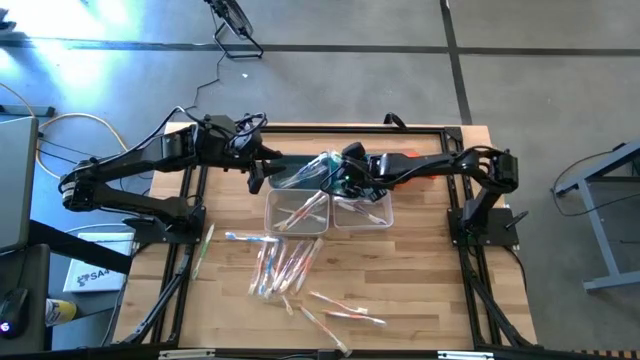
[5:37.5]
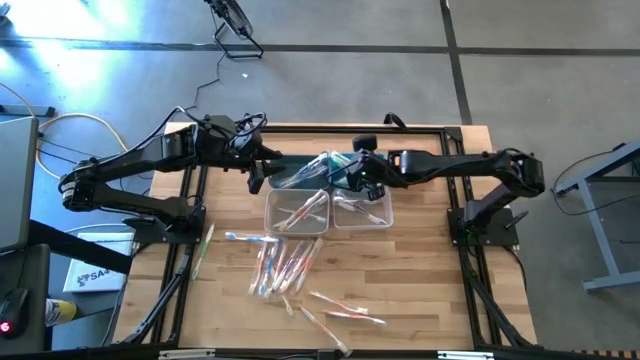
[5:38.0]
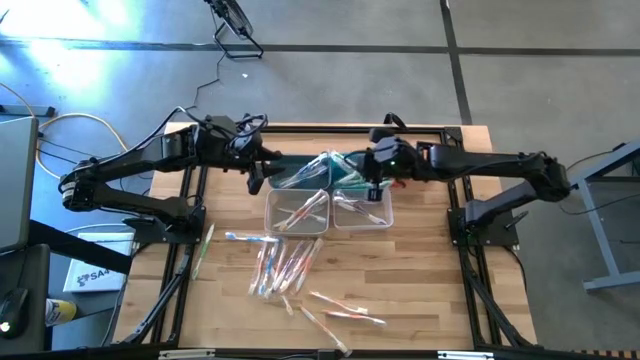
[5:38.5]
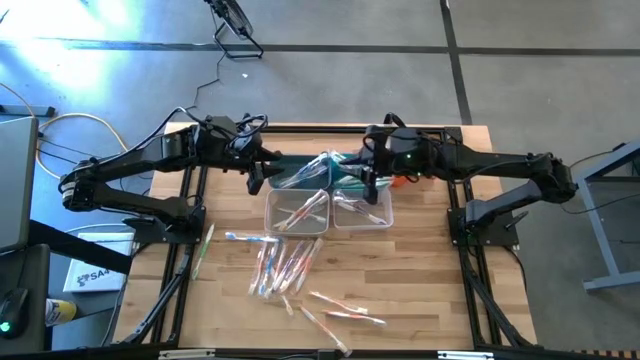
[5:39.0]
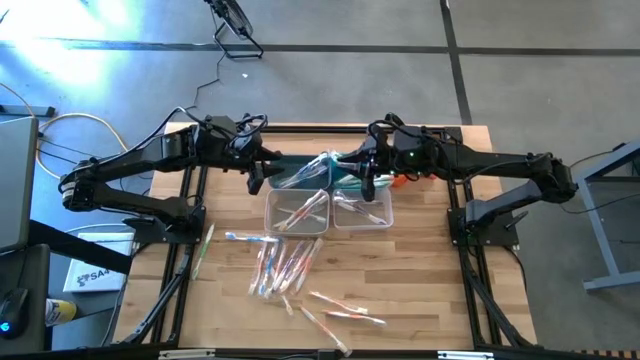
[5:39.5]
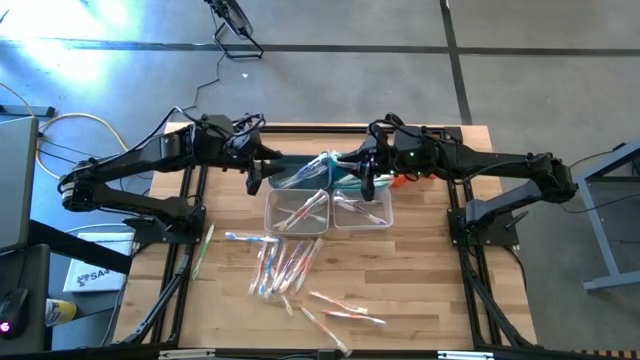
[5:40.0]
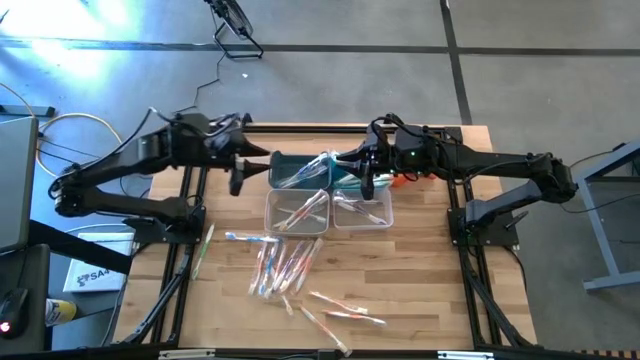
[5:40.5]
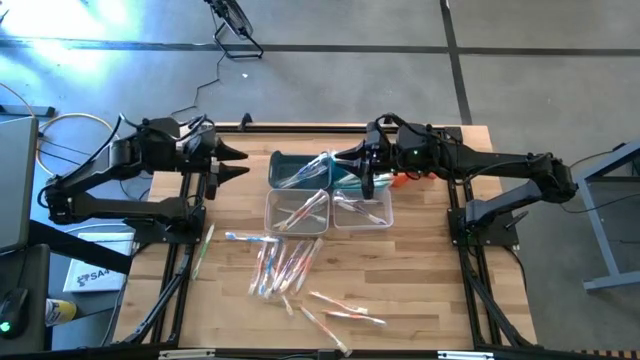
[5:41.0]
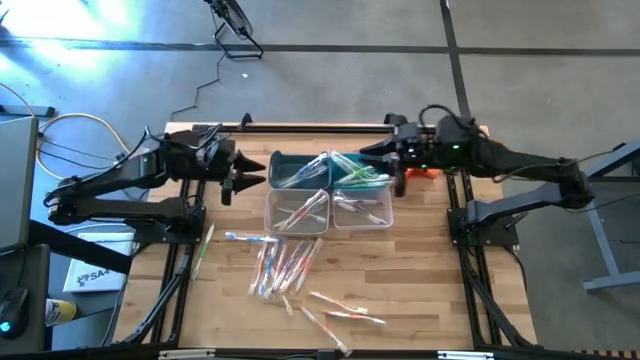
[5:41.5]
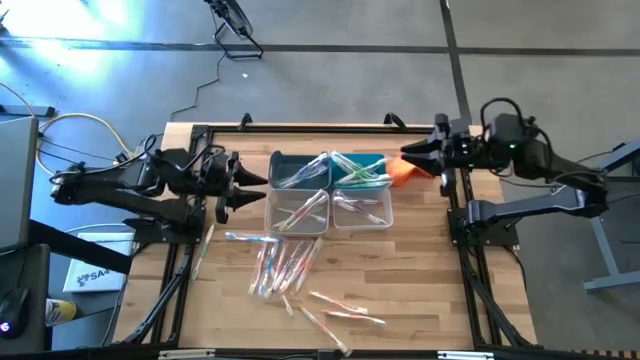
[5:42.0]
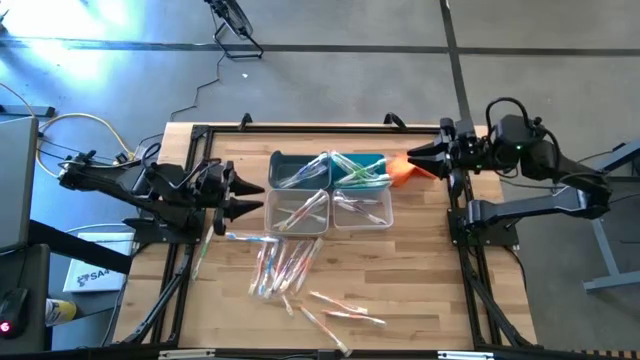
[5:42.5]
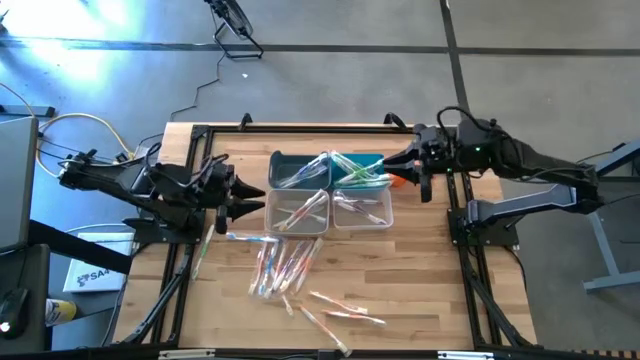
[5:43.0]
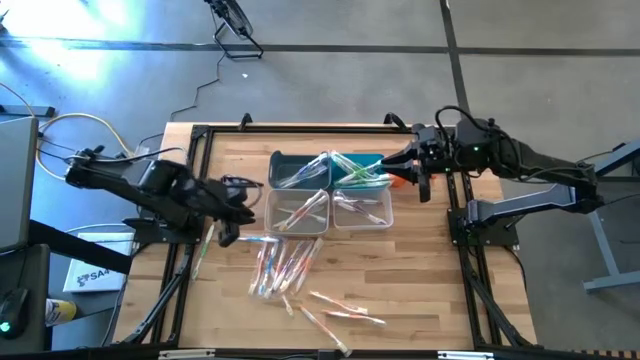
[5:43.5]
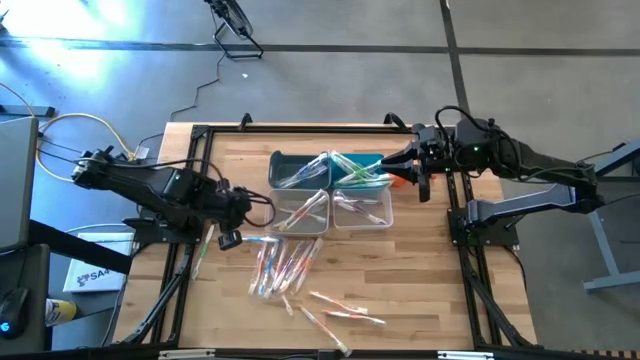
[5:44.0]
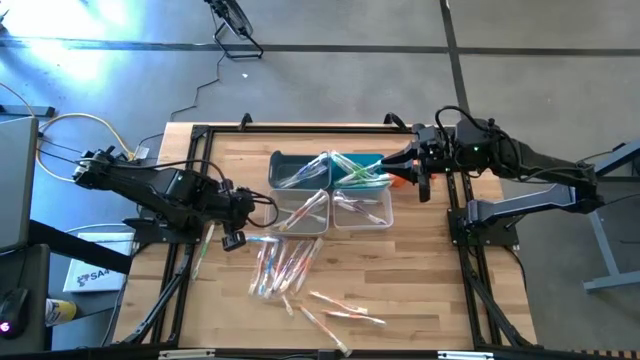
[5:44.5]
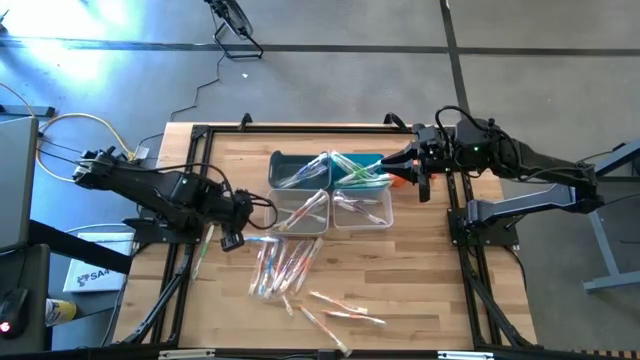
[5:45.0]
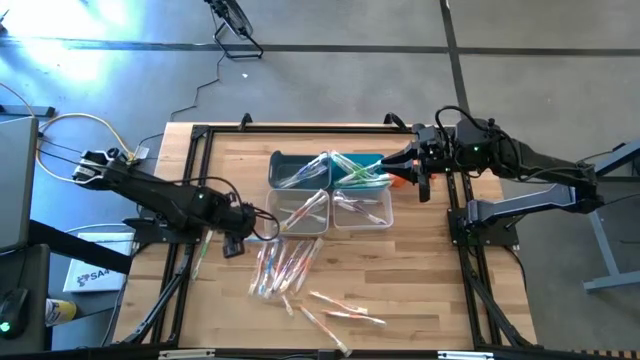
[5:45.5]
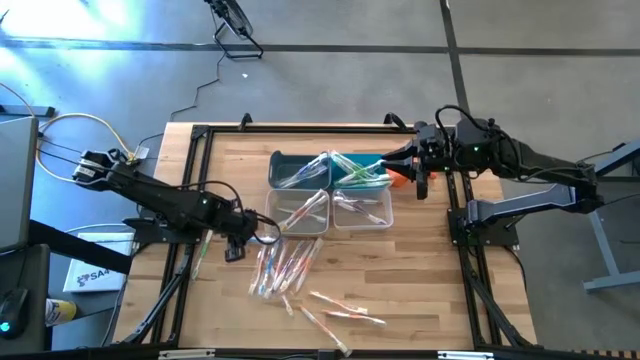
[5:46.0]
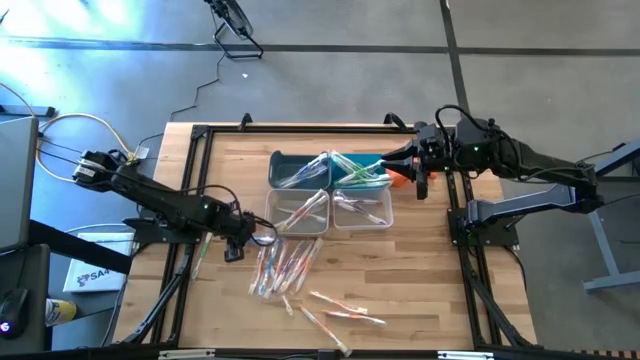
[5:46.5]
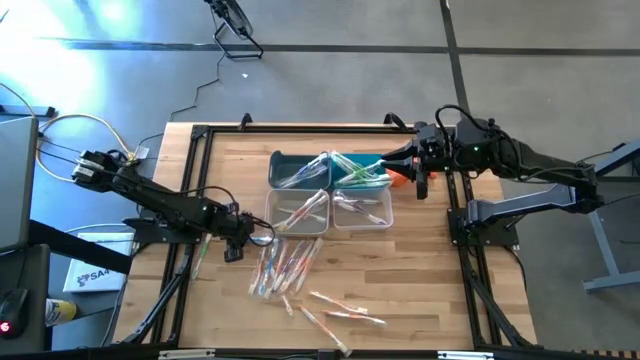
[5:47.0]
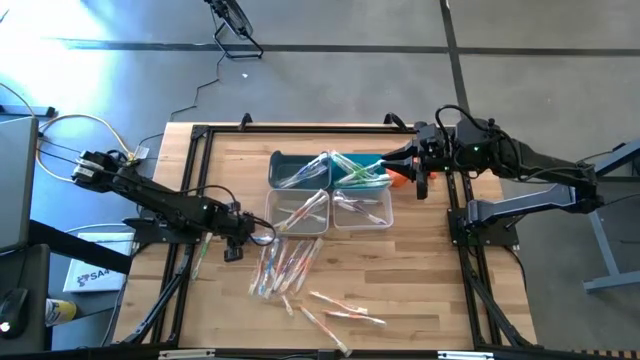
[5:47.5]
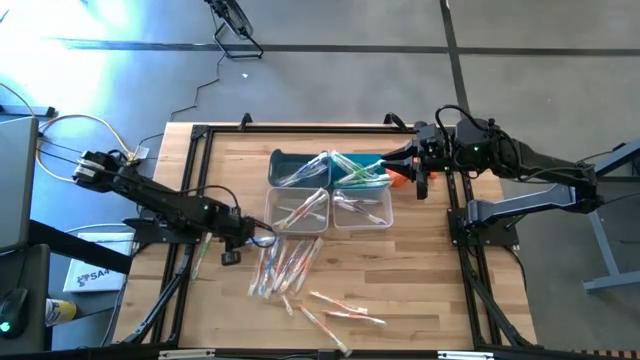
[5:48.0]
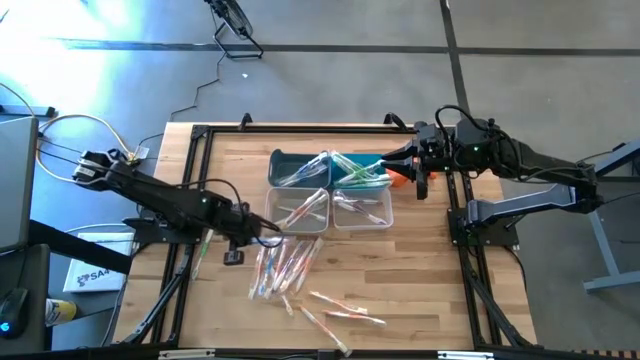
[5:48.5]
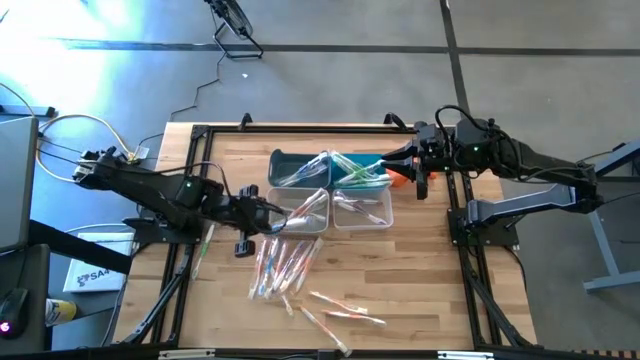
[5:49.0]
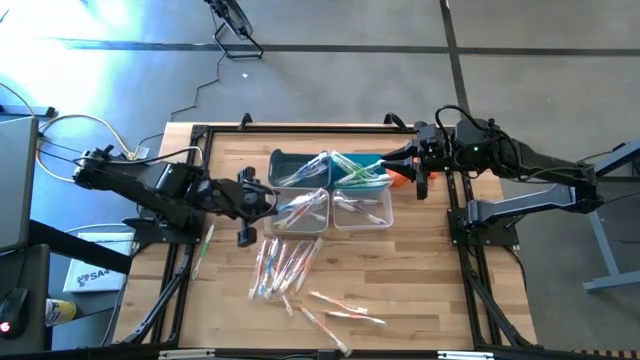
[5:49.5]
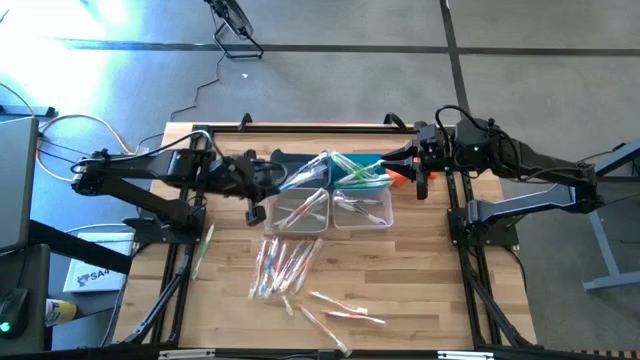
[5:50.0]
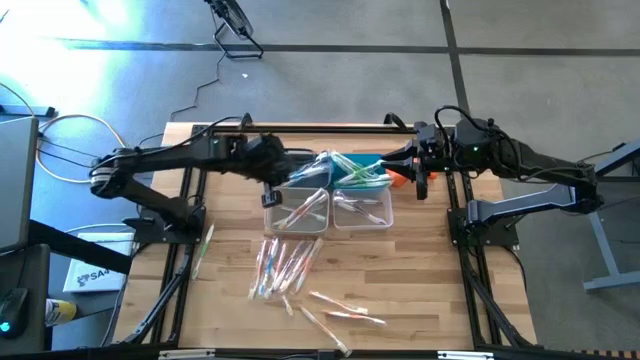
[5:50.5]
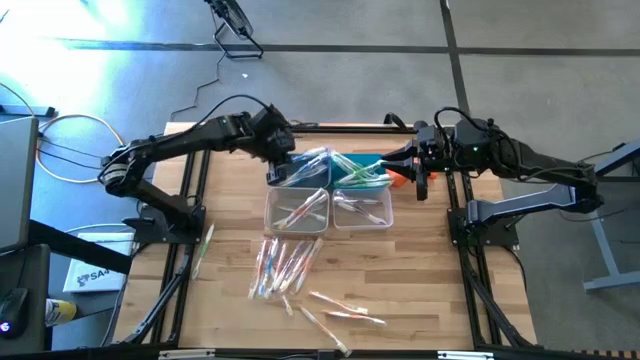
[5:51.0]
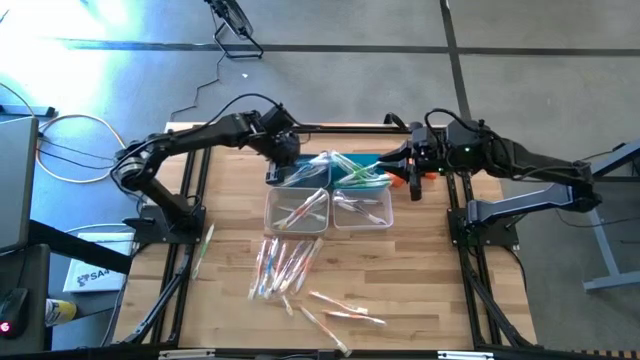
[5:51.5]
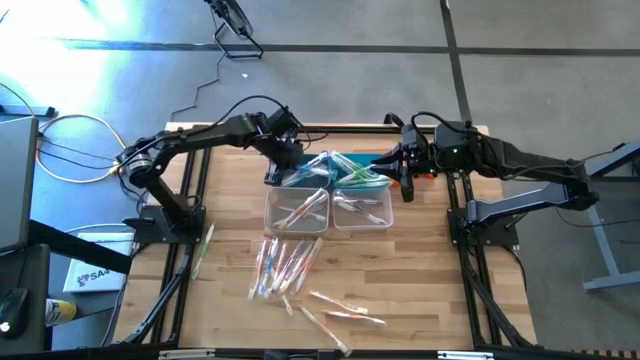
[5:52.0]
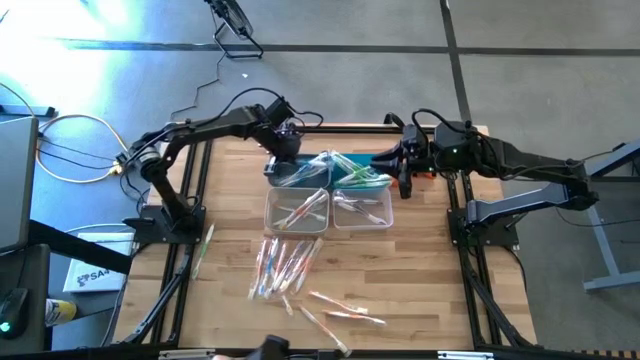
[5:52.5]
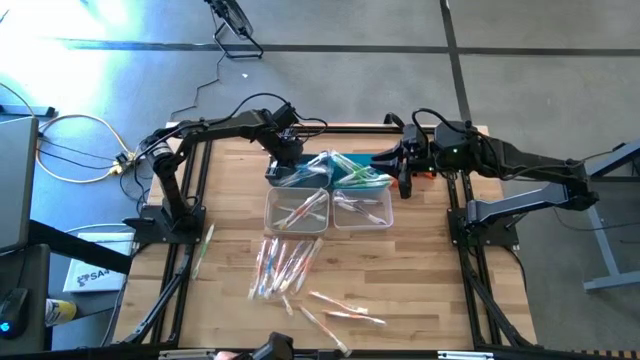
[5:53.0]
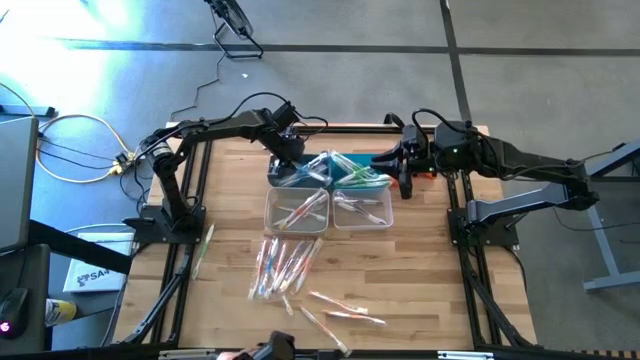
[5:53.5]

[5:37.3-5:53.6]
Task: Pick & Place Toothbrushes
Put the blue toothbrush into the dark blue bin

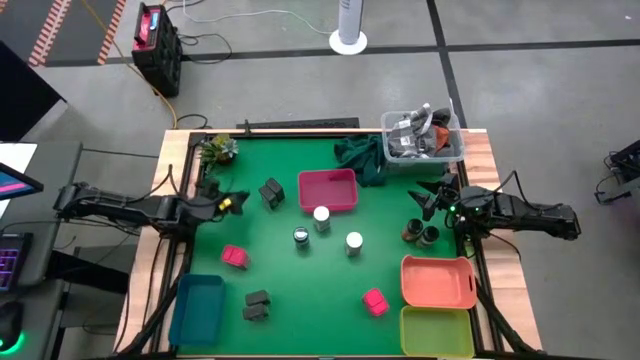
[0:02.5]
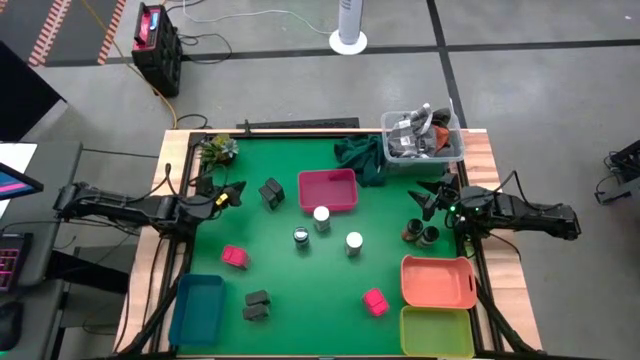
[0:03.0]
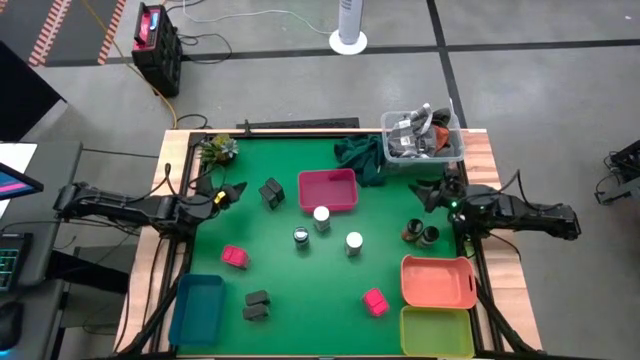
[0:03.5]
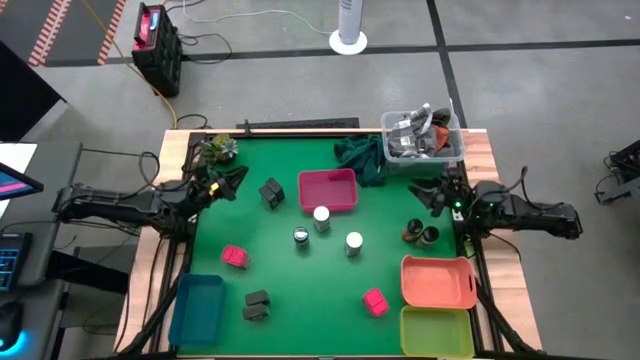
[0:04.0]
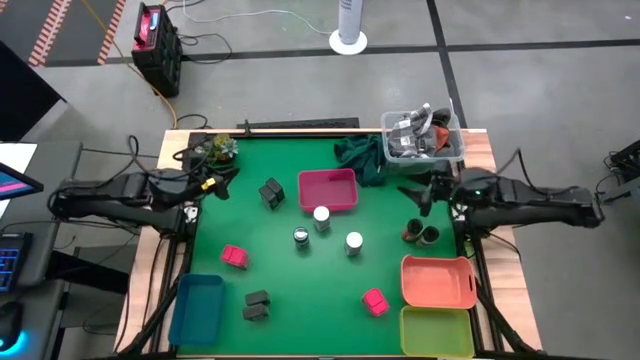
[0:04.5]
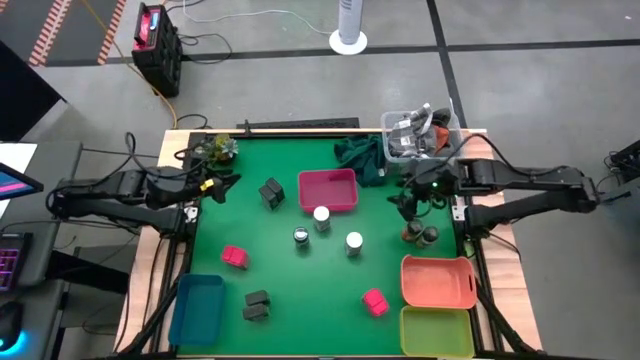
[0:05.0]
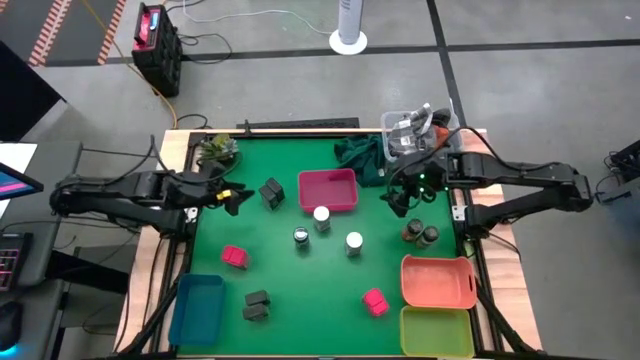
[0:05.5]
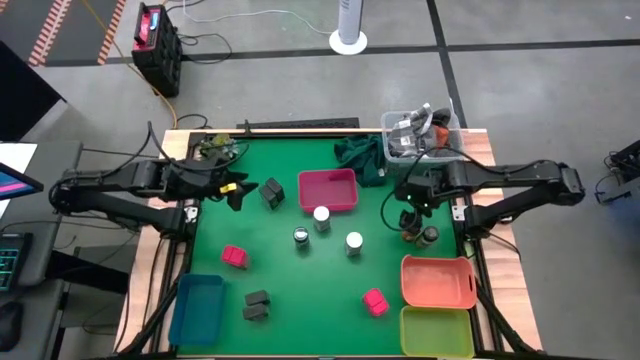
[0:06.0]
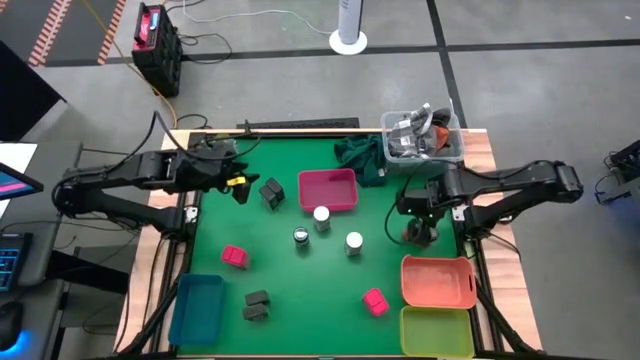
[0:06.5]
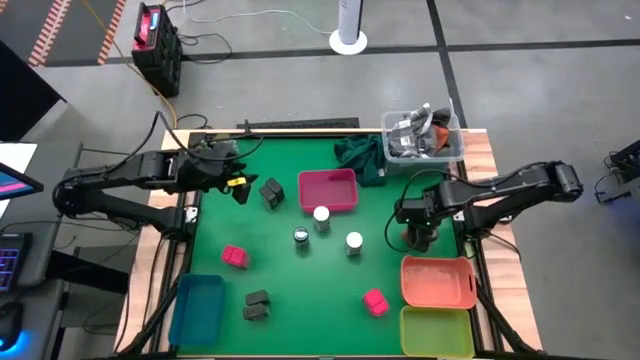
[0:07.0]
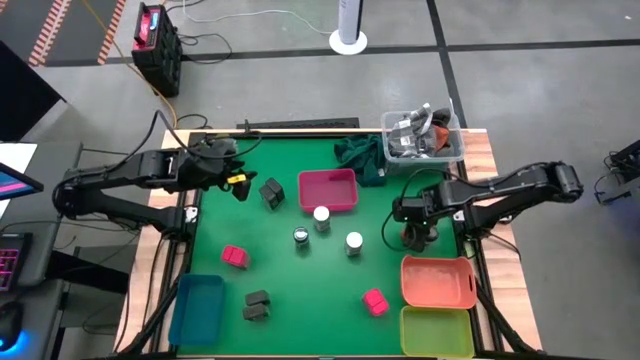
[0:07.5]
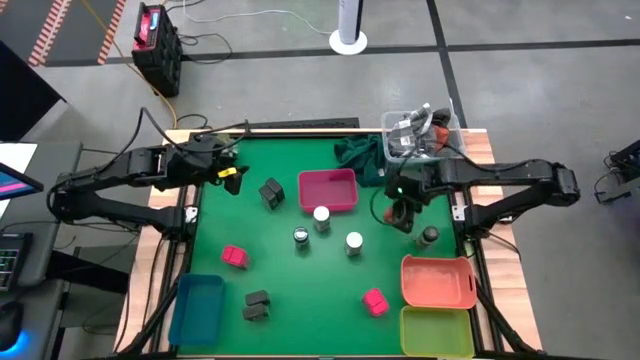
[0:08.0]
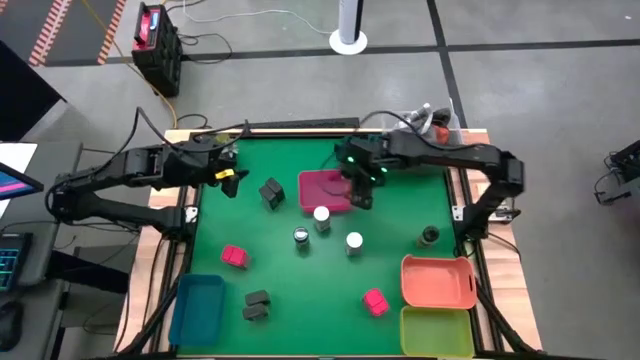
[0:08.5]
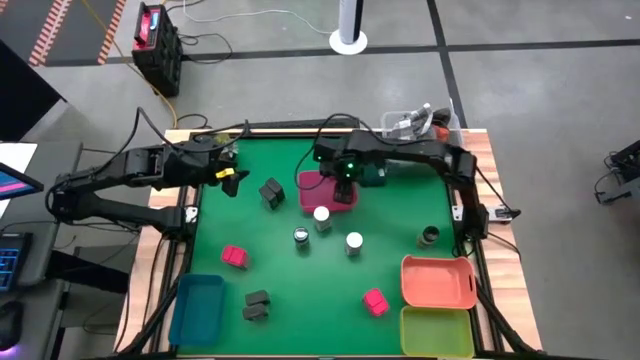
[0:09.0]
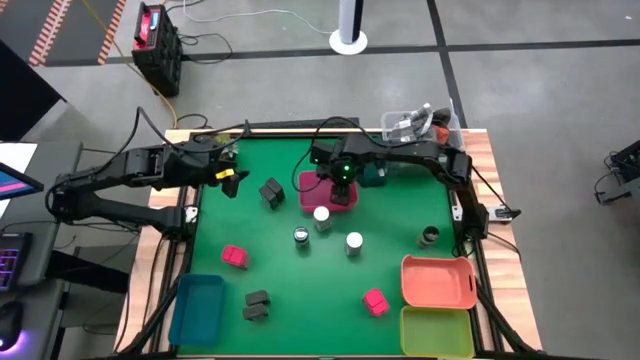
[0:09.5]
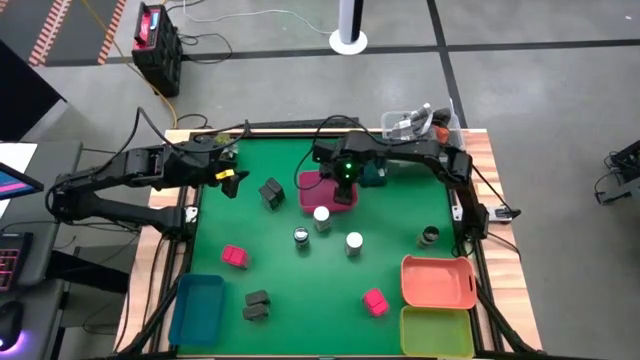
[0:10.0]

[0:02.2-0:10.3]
Task: Sort spices by type
Put the middle black seasoning bottle into the red bin
